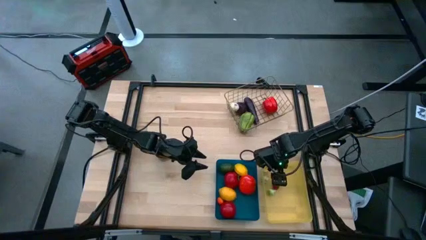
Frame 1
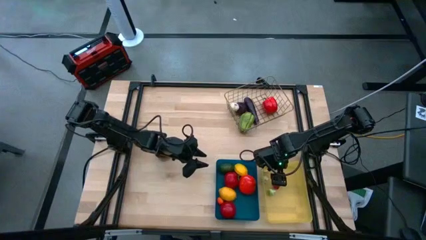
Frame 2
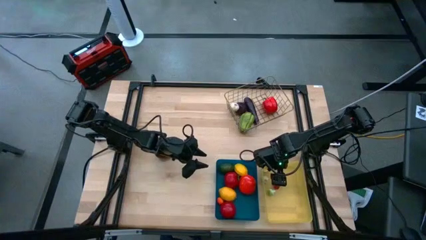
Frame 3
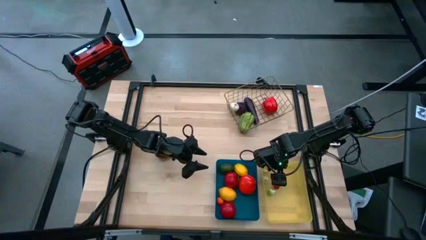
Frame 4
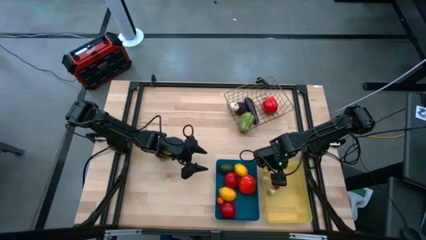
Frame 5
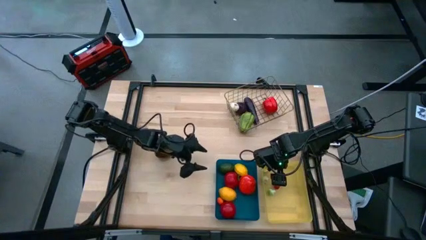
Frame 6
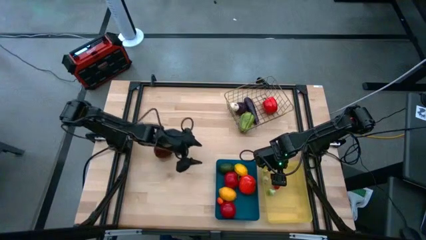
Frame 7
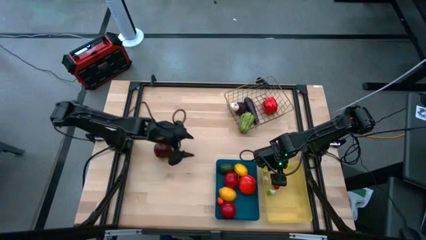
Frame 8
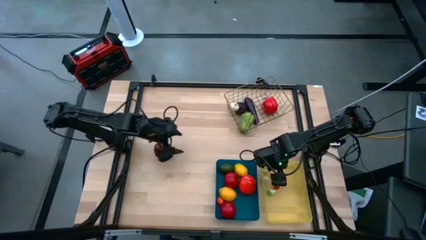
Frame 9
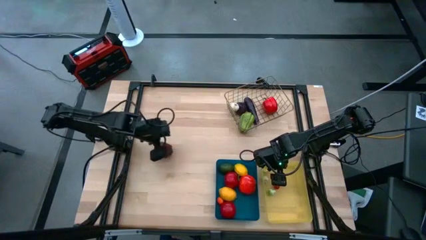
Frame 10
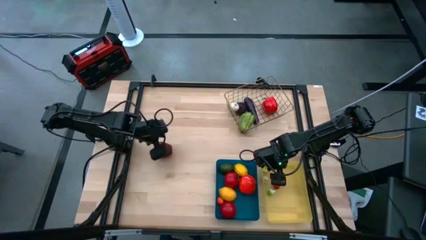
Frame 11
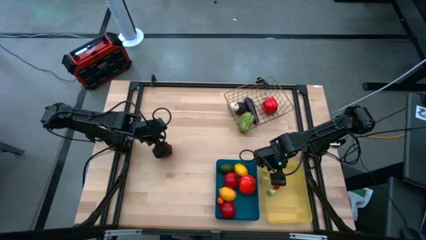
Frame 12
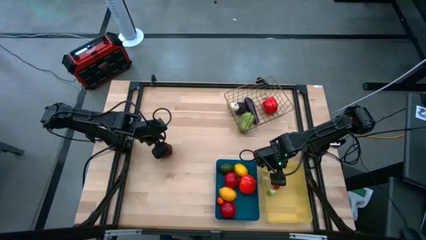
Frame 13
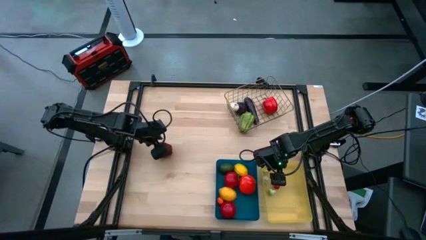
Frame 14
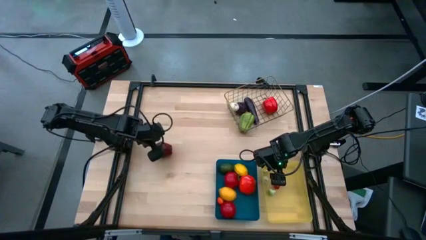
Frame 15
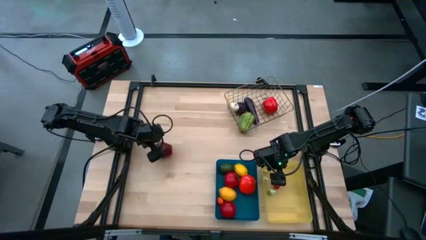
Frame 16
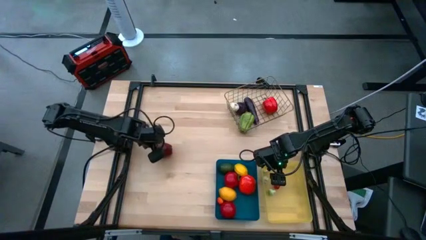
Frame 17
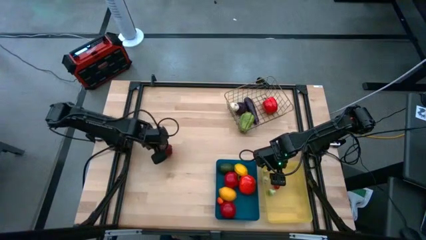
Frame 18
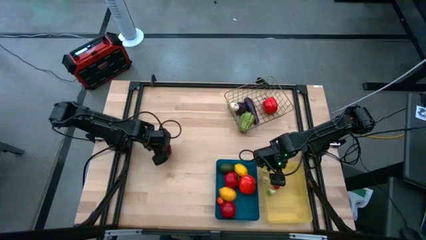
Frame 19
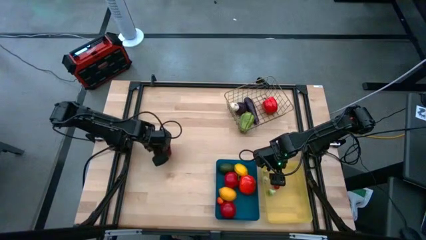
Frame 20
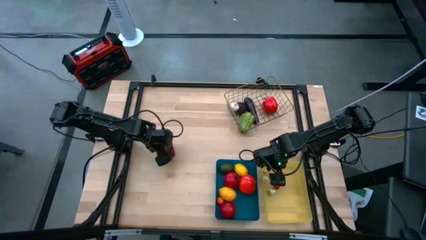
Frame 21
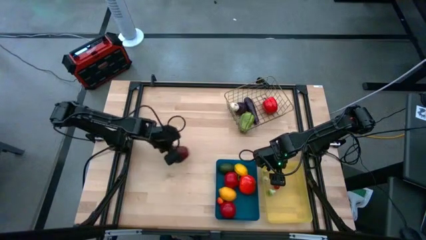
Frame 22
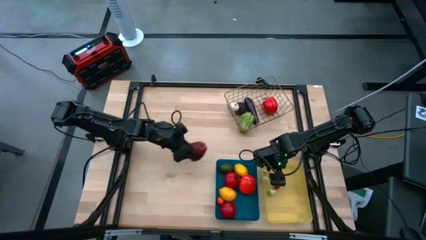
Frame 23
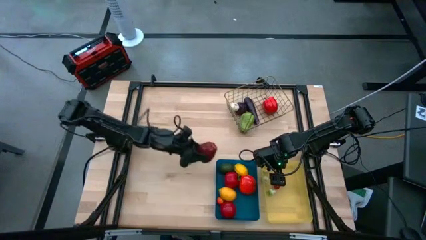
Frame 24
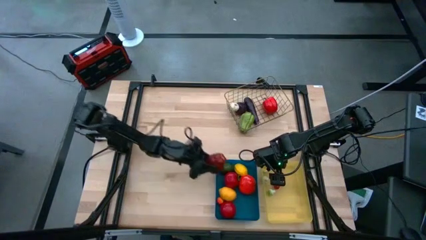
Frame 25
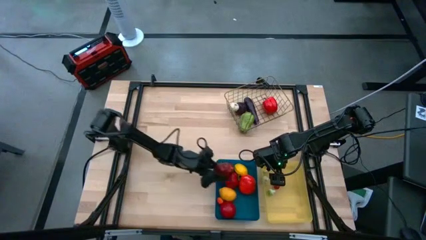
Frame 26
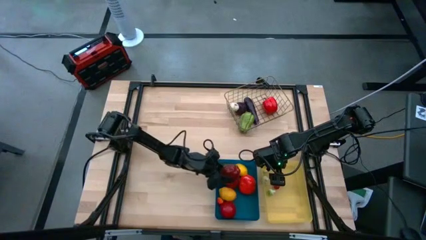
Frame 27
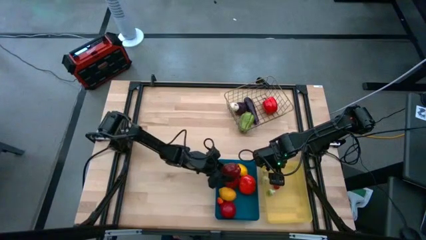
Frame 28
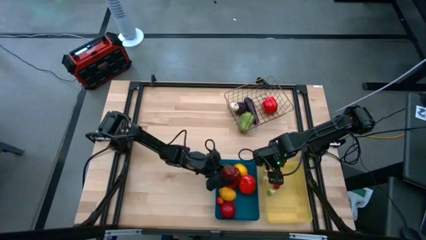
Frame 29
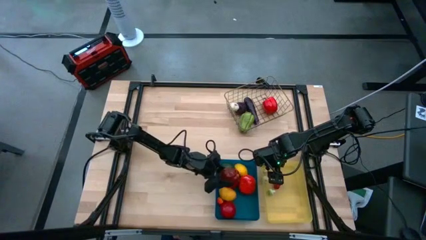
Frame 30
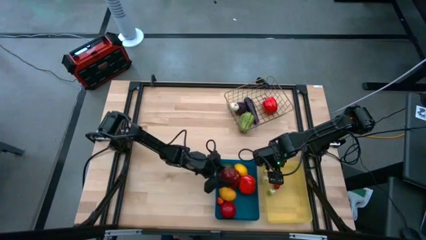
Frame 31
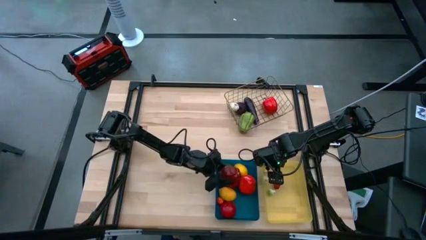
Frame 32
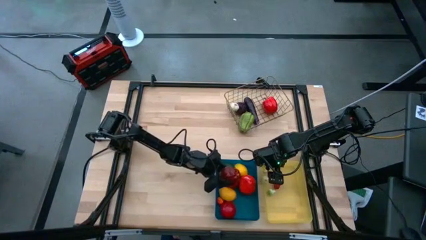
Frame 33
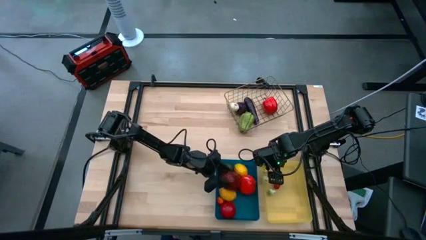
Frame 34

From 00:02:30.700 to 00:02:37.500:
Task: Sort produce into baskets
Put the red apple into the blue bin

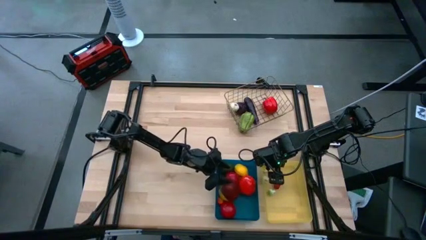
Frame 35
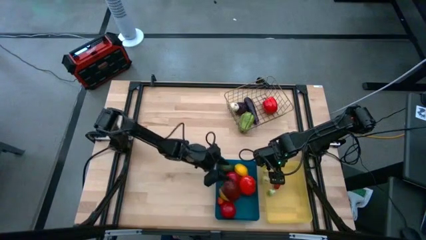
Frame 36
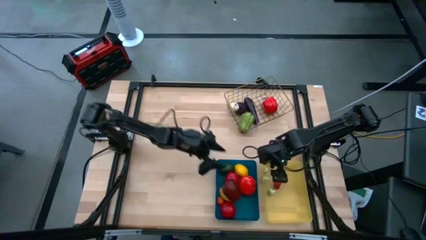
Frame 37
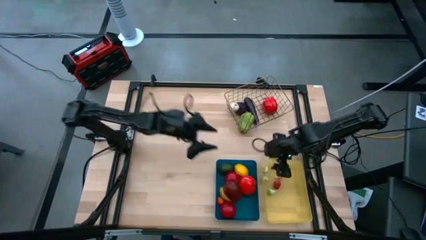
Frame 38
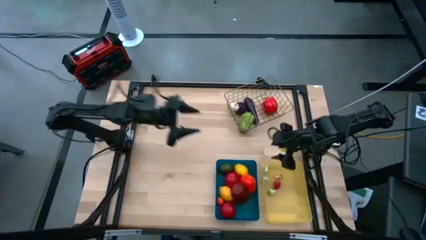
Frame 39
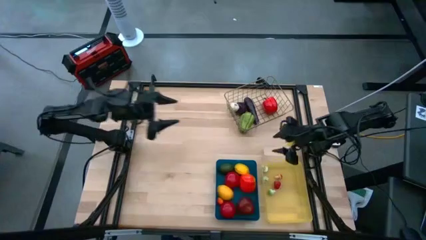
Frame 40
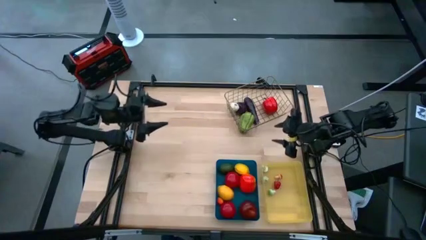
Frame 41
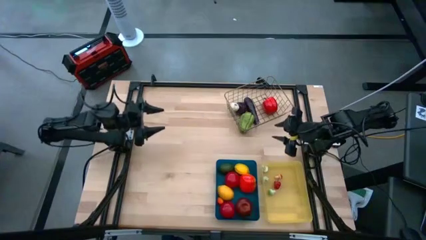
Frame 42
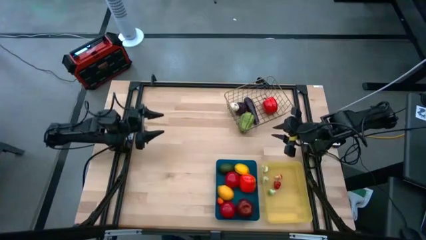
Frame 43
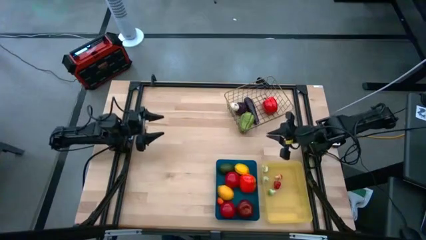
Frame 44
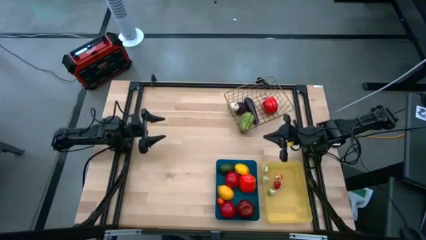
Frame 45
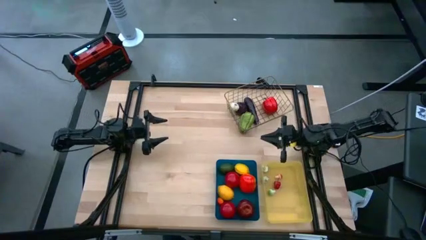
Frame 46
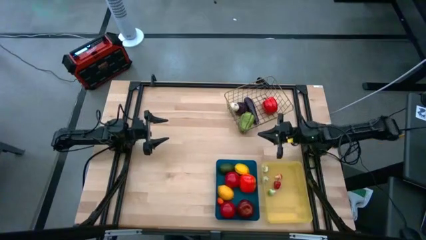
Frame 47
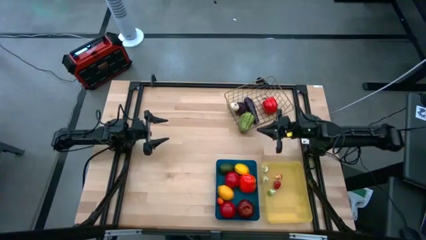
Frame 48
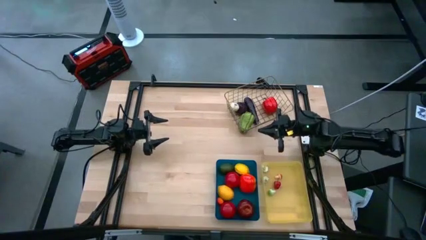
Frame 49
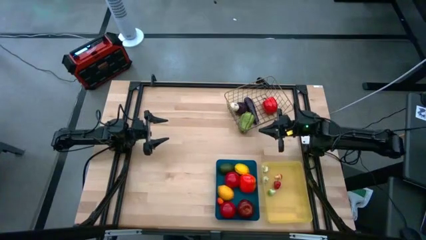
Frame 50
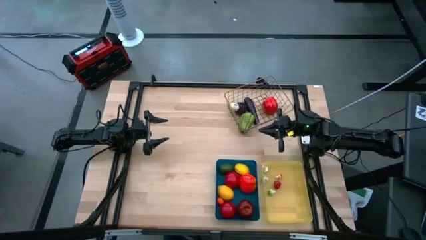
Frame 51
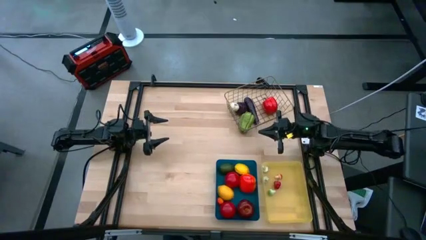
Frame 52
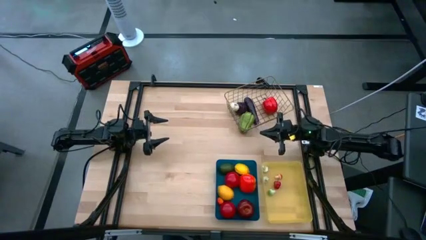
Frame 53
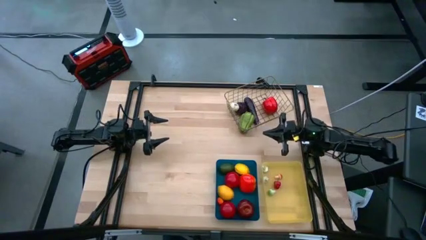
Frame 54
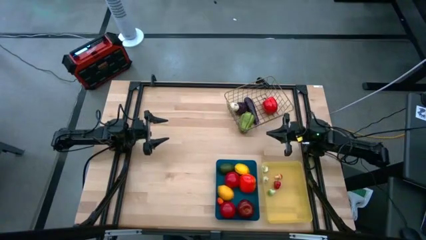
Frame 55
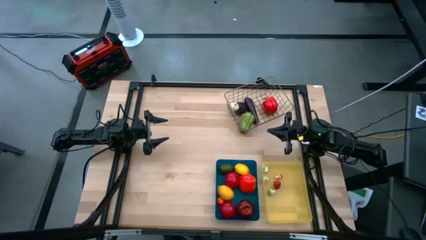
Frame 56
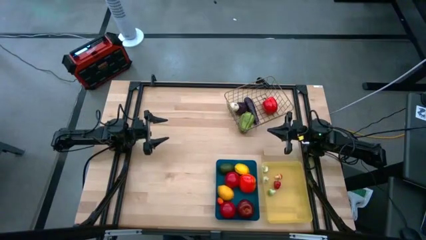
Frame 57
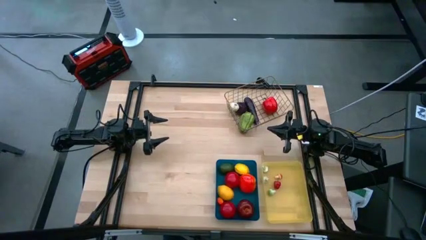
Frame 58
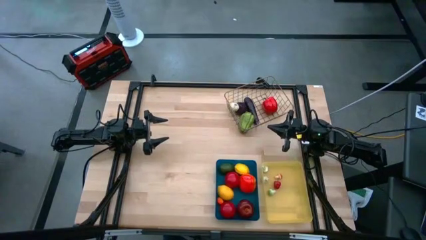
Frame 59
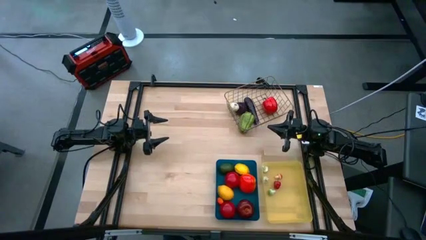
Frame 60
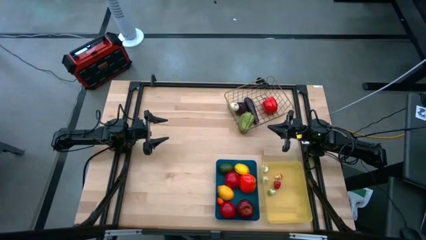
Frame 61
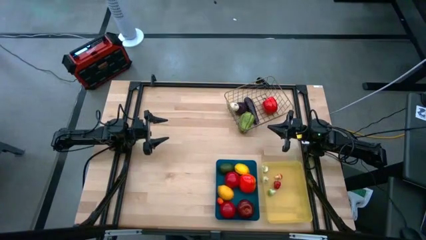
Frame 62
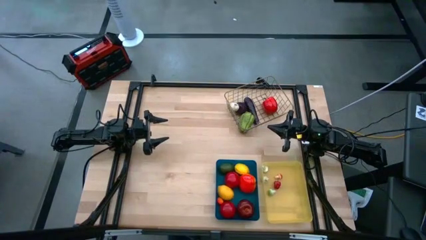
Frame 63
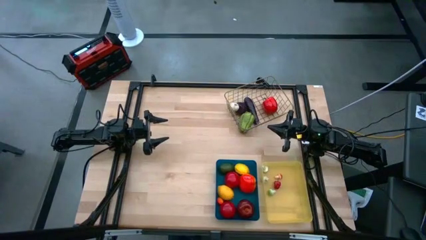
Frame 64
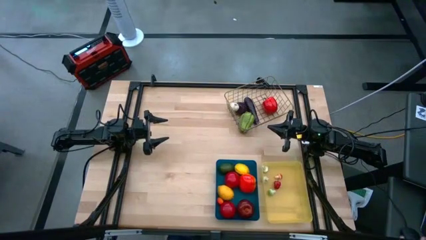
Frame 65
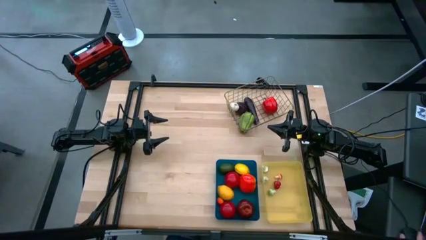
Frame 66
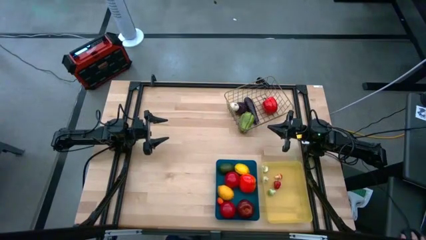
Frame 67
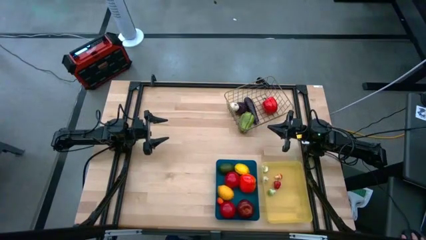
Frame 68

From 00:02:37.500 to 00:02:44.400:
Return to Home Position
